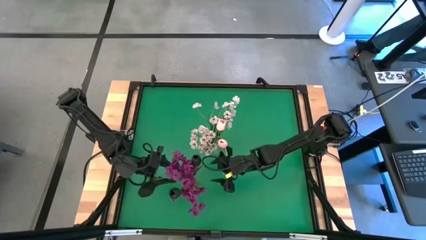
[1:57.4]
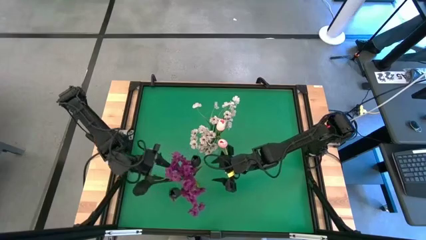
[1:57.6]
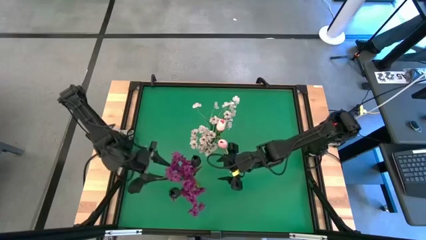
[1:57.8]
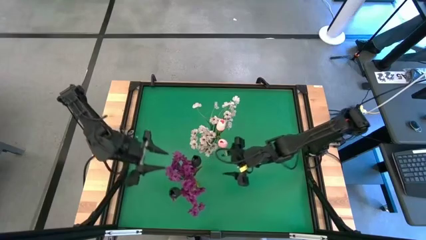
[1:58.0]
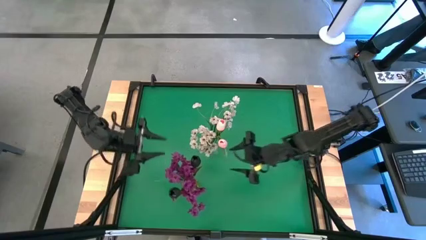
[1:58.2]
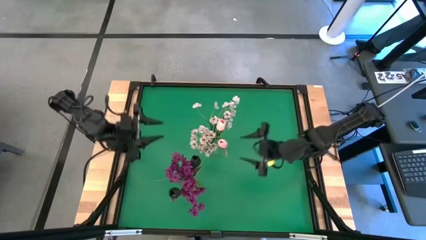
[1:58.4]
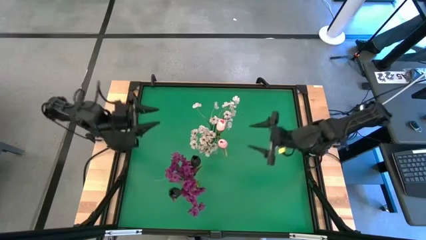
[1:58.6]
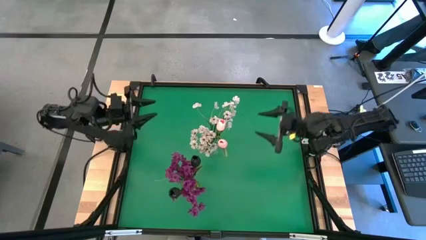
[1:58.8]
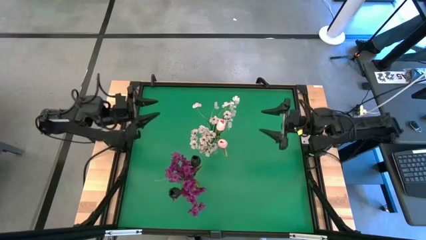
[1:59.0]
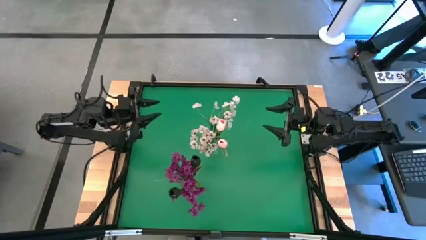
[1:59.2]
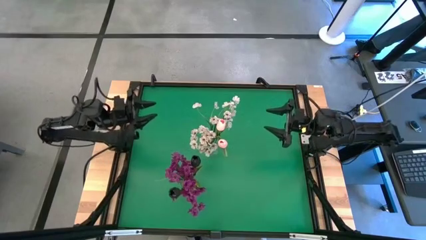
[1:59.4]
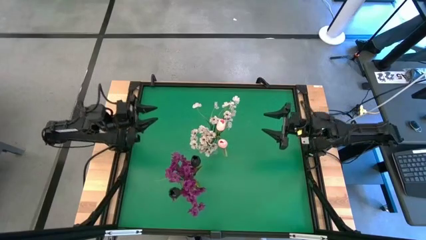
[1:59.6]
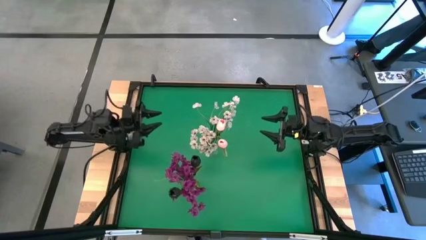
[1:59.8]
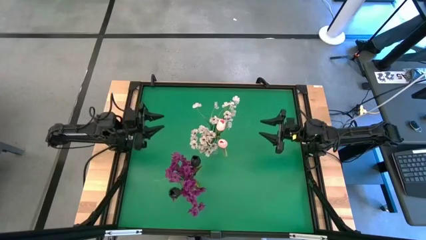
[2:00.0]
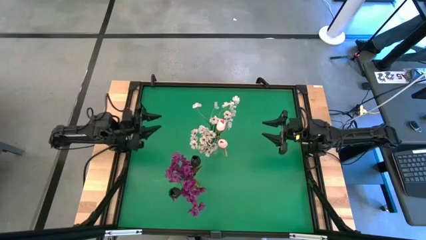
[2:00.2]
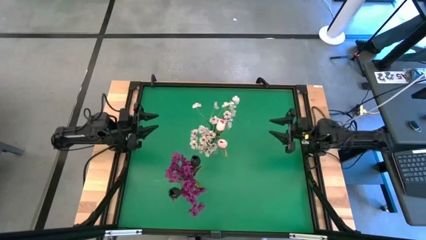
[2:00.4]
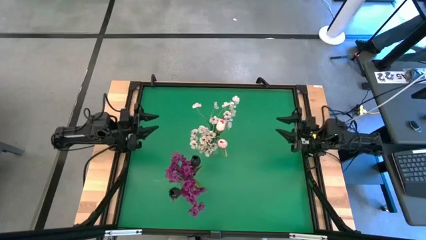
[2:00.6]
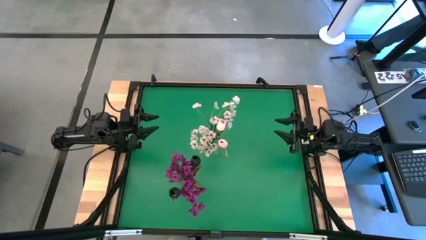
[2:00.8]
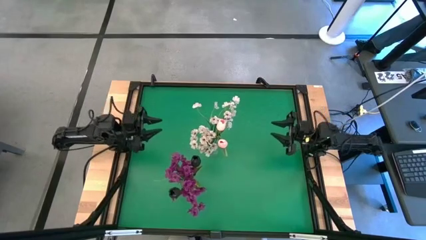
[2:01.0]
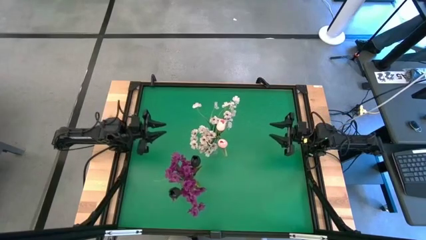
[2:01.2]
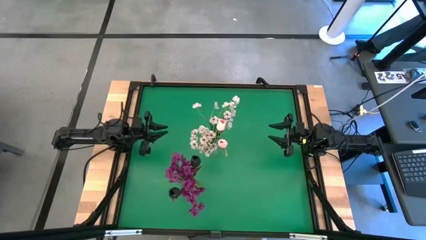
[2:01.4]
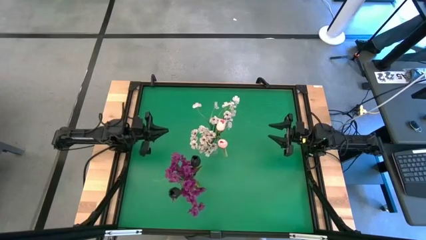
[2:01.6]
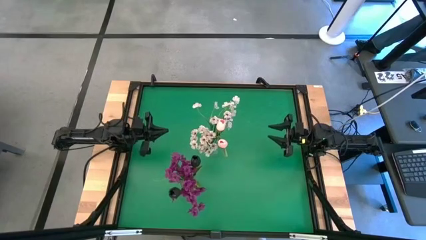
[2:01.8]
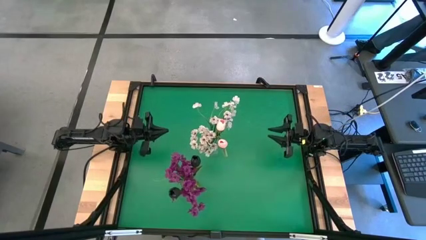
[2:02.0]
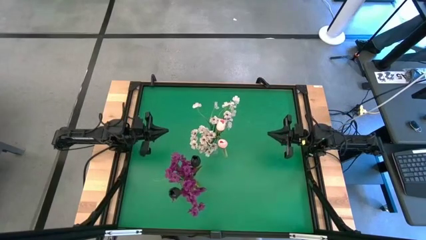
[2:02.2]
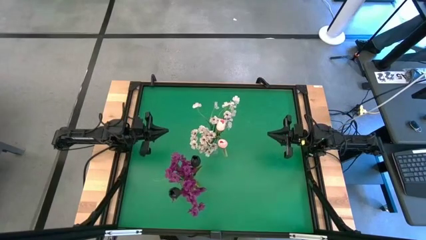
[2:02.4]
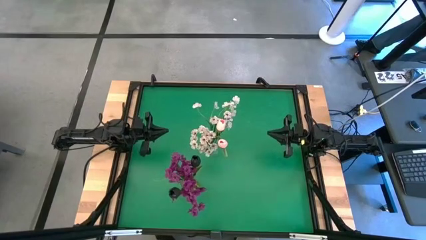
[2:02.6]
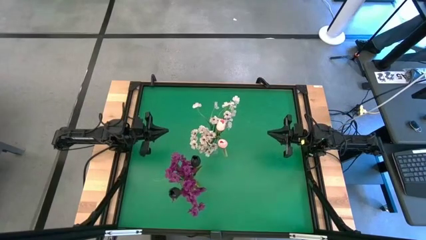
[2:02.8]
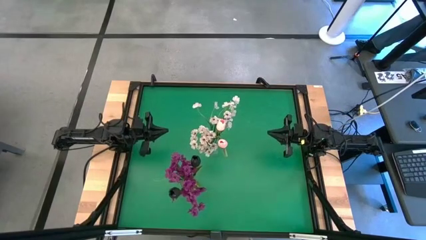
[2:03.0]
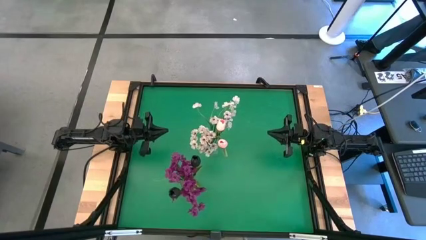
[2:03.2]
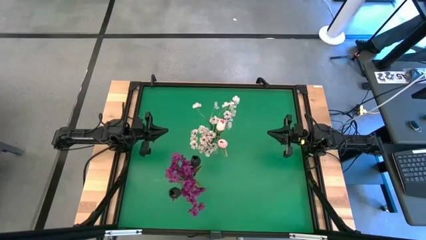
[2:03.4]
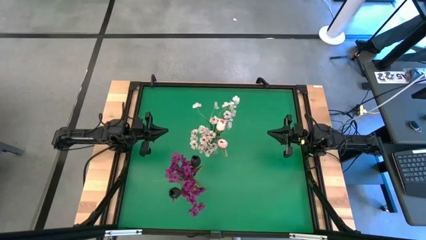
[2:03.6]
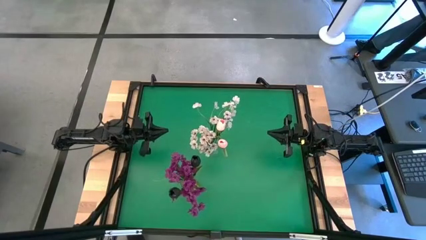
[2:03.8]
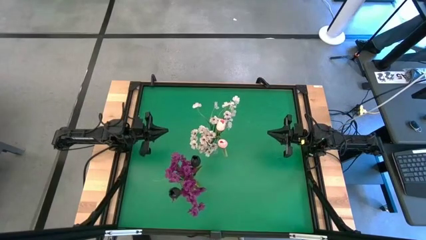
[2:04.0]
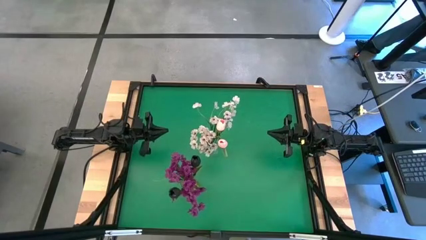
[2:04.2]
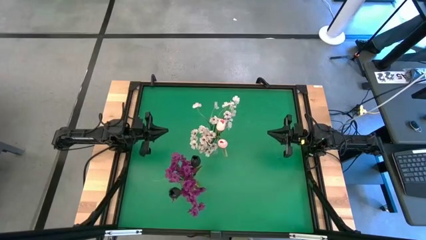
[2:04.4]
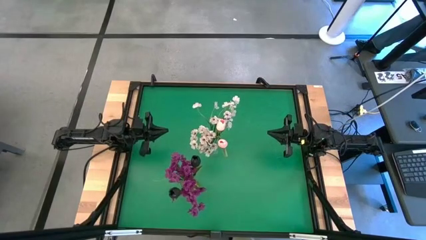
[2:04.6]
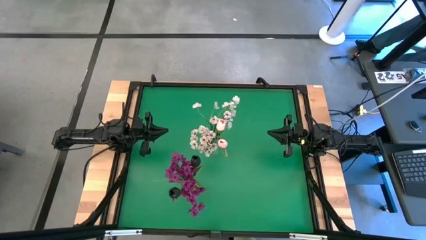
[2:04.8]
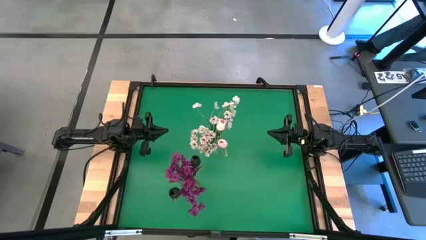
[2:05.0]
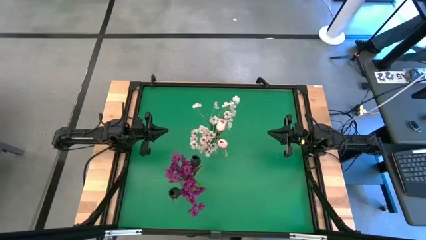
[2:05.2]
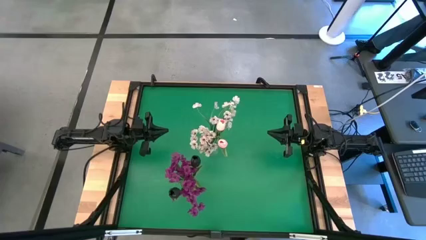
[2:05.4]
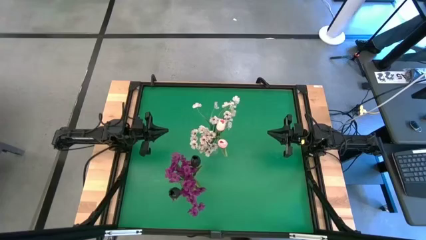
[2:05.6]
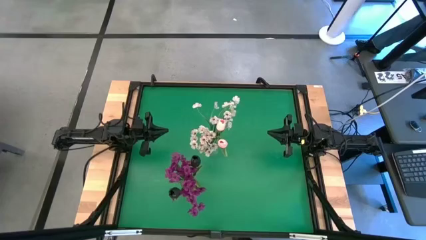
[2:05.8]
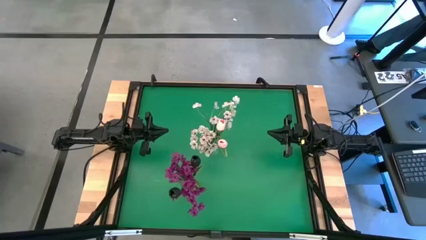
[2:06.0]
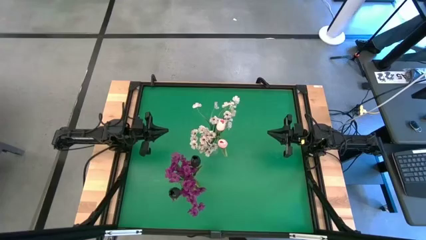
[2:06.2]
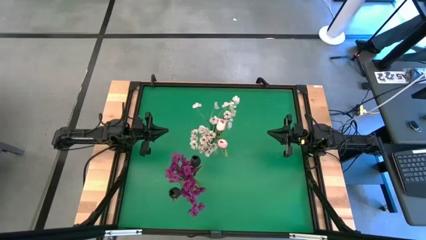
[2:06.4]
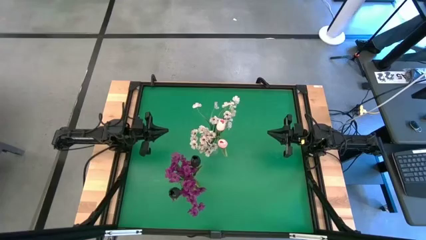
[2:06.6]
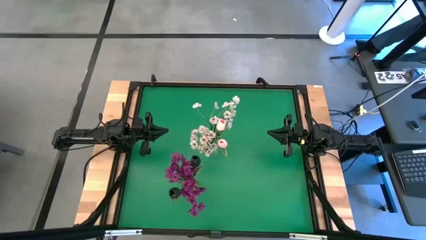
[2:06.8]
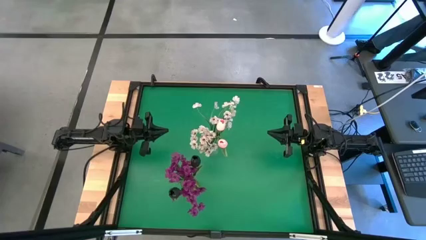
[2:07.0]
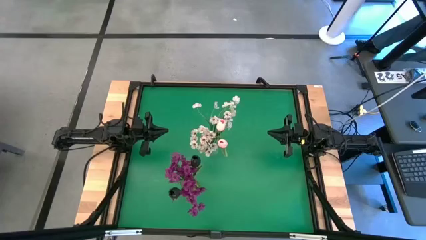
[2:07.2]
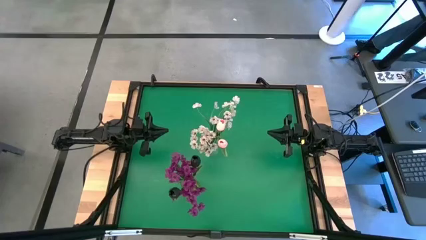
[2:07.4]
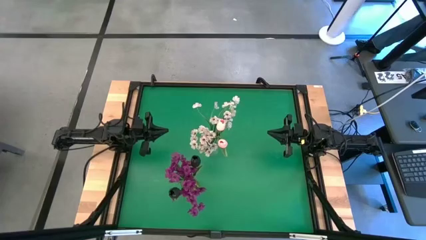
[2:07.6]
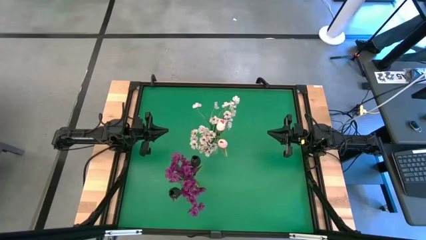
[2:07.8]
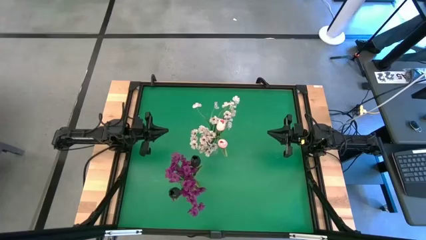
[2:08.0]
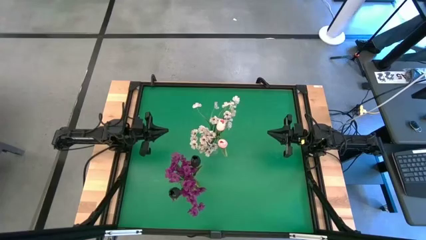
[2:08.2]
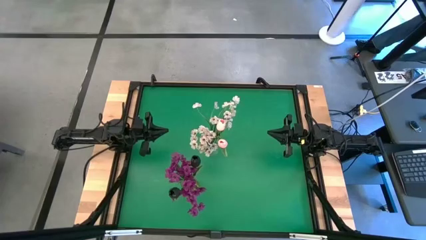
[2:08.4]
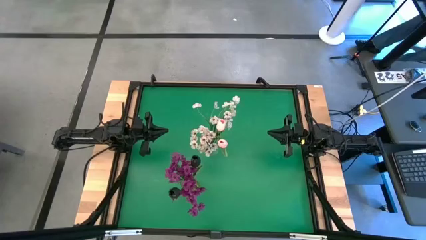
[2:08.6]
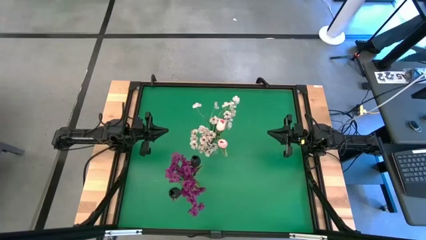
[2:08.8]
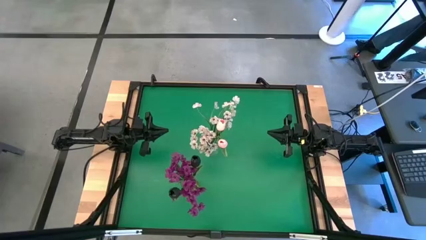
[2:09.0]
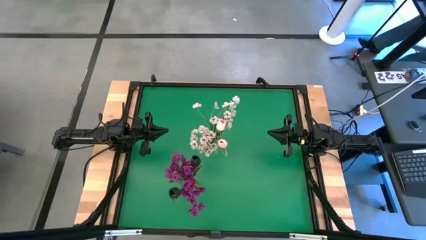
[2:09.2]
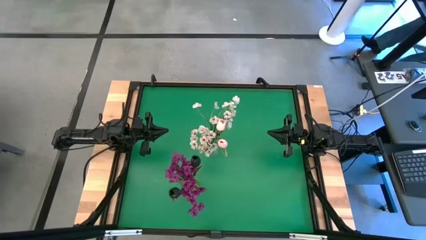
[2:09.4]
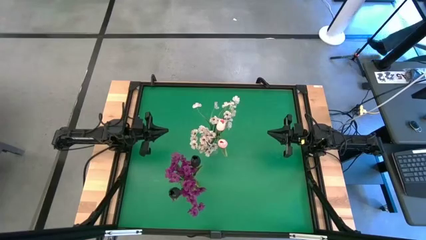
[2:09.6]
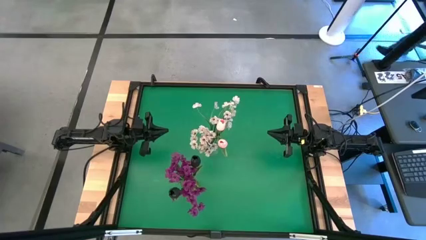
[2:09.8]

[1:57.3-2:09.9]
Task: Sort flowers into vase by color
Return to Home Position

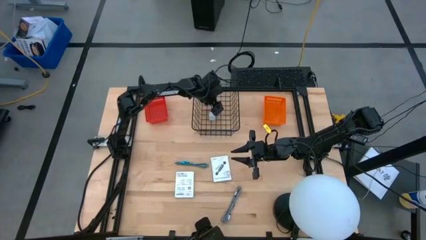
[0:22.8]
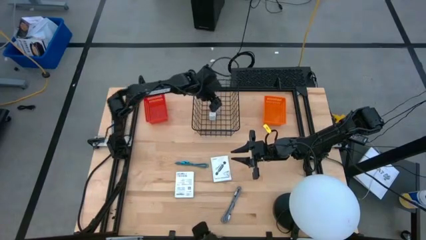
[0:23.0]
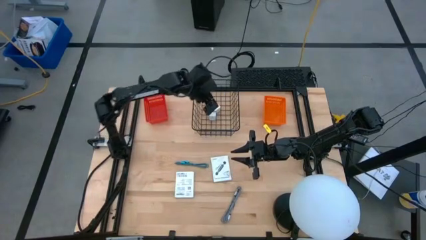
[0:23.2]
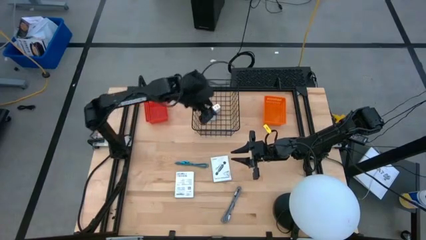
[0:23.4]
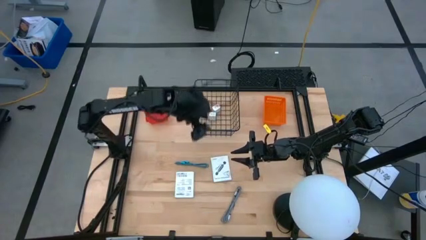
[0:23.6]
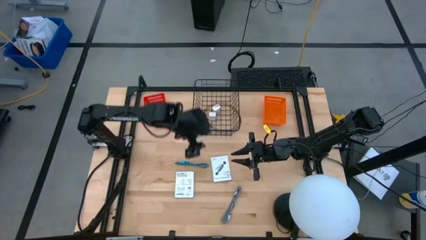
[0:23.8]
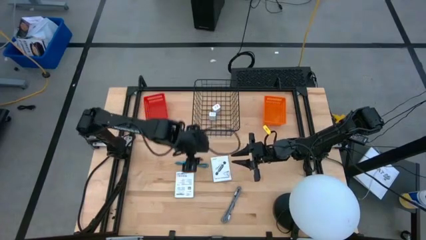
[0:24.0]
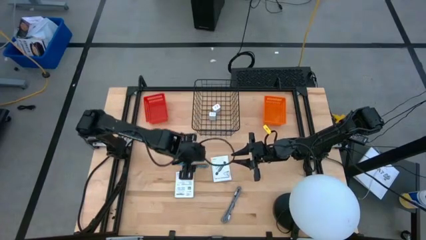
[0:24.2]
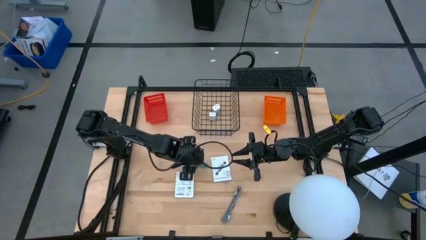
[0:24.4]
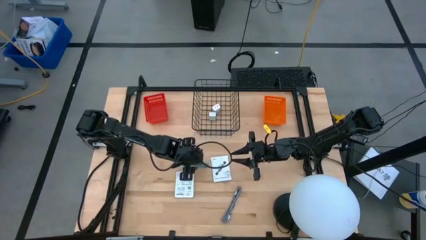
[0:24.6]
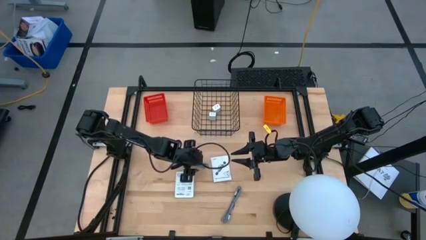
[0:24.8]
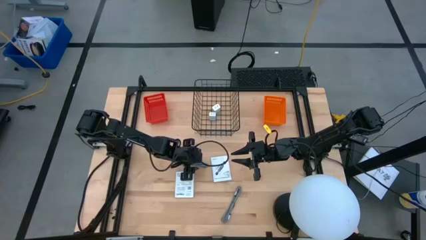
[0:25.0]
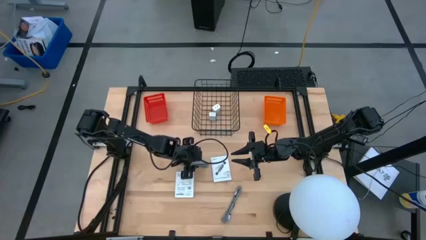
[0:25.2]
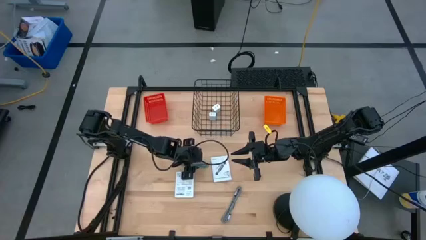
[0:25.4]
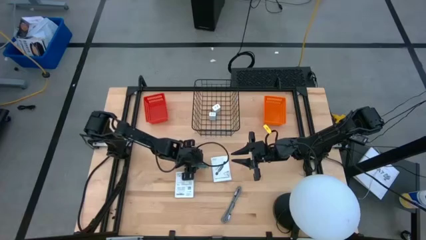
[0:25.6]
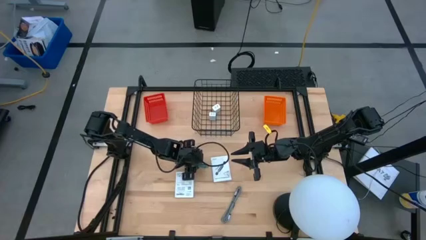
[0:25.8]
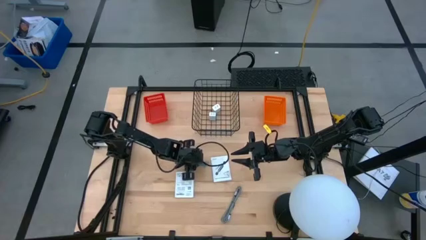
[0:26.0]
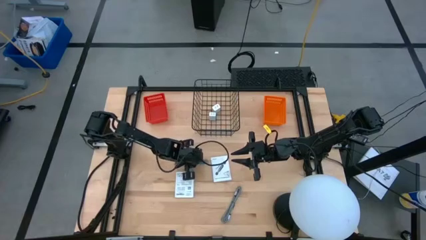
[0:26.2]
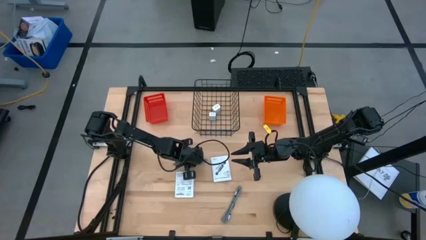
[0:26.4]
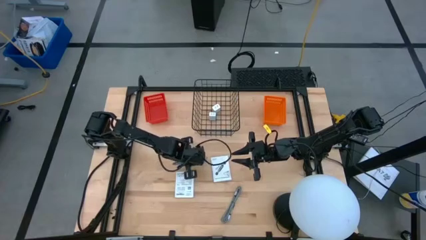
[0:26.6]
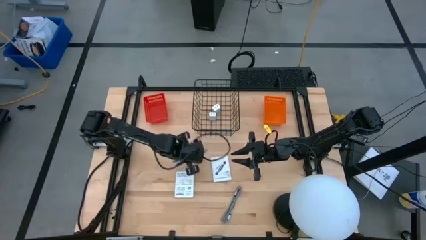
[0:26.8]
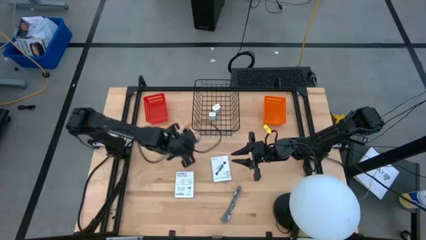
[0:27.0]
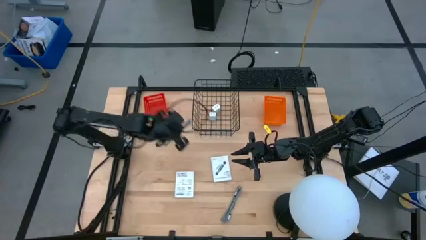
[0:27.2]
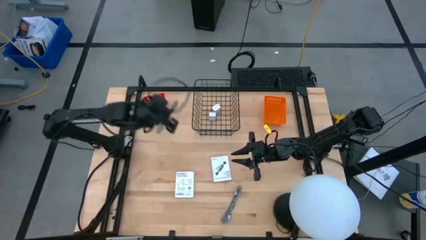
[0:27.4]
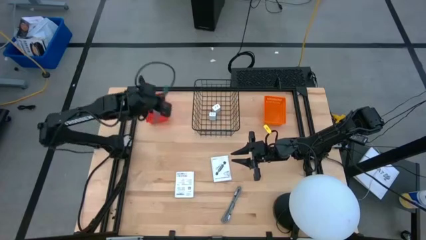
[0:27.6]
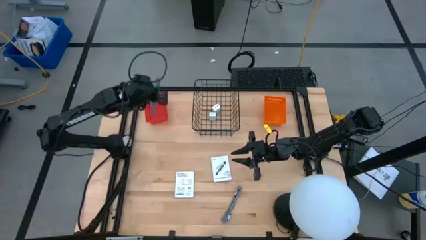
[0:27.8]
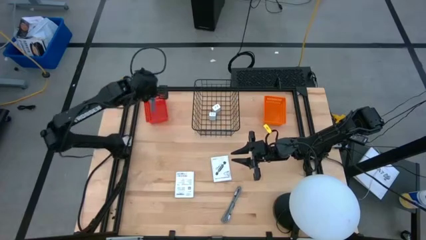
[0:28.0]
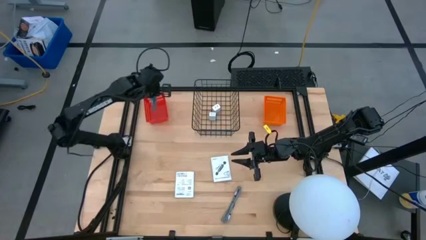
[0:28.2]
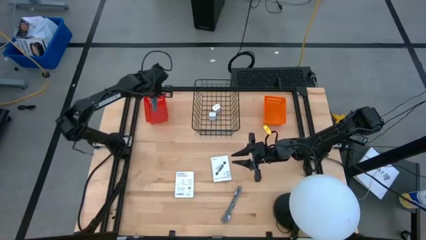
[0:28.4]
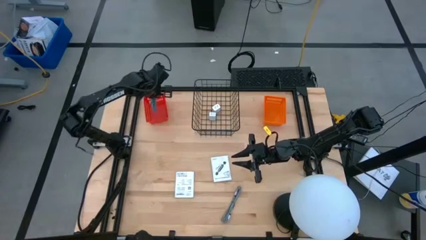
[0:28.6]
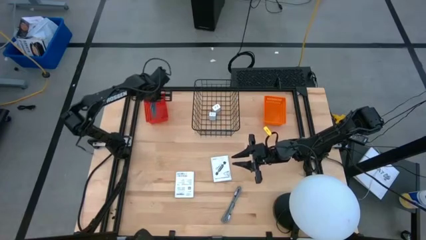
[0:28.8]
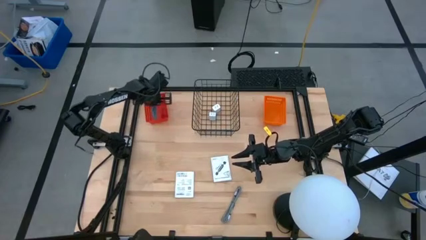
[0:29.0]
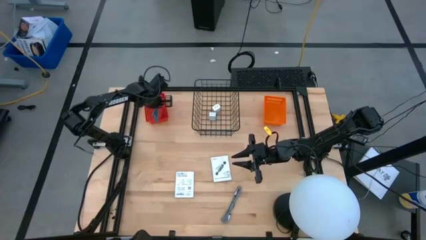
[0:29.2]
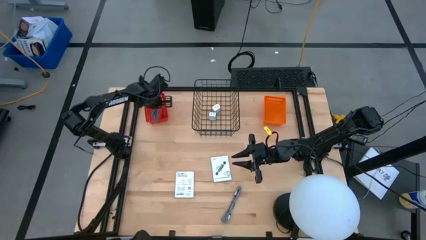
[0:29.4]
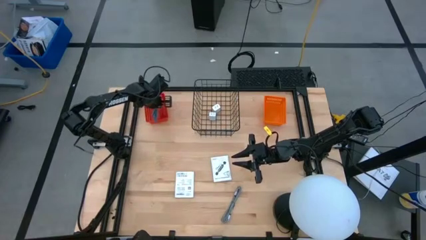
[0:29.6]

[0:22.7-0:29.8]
Task: Pick and place items into bin
Put the blue charging cable into the red basket
